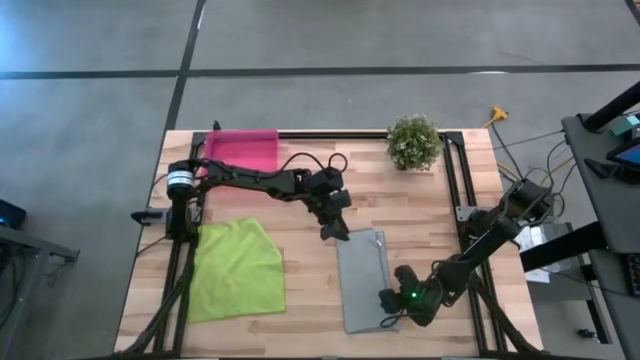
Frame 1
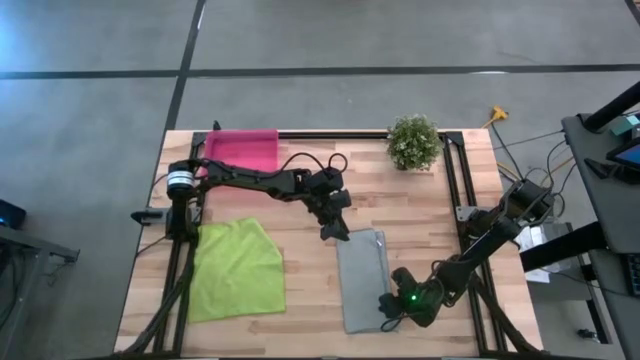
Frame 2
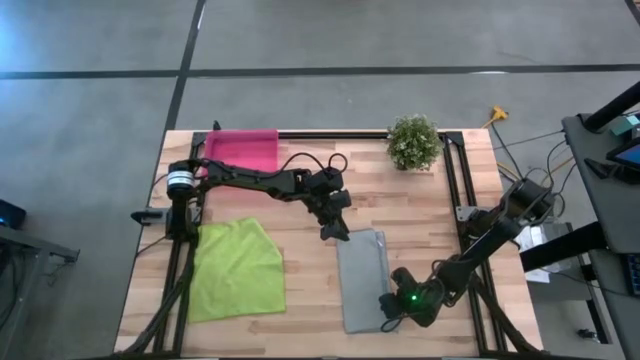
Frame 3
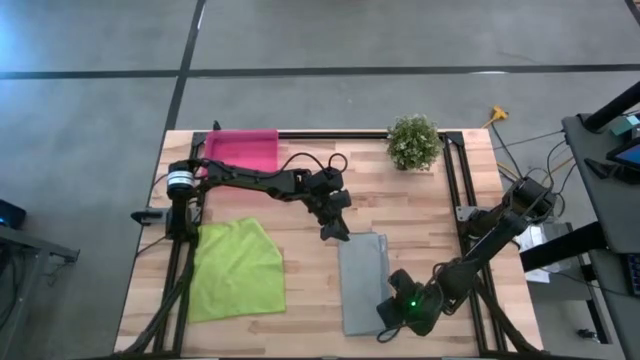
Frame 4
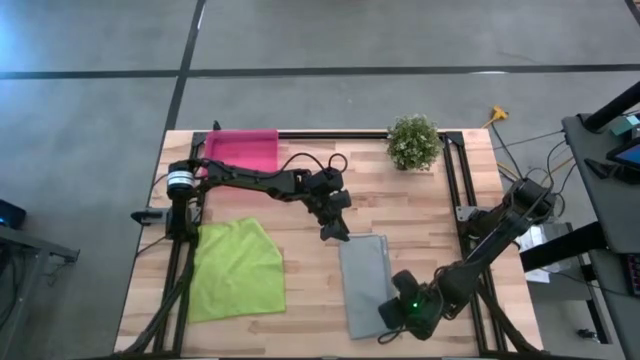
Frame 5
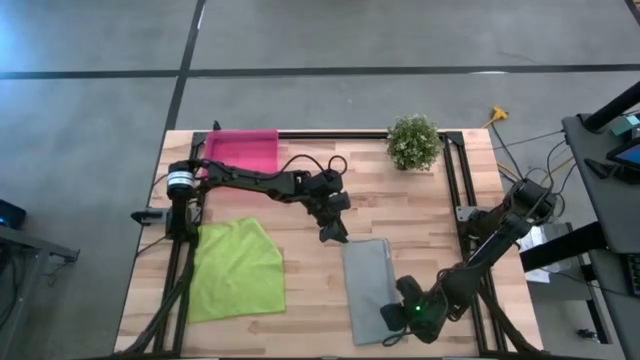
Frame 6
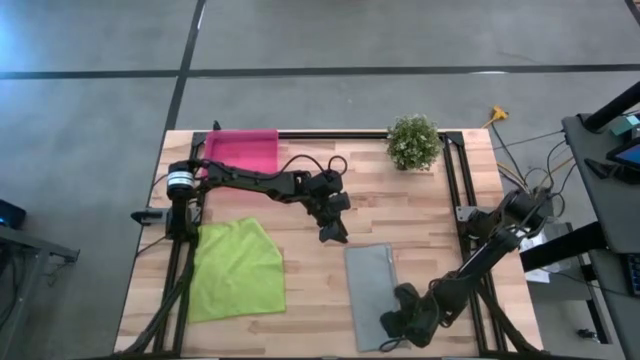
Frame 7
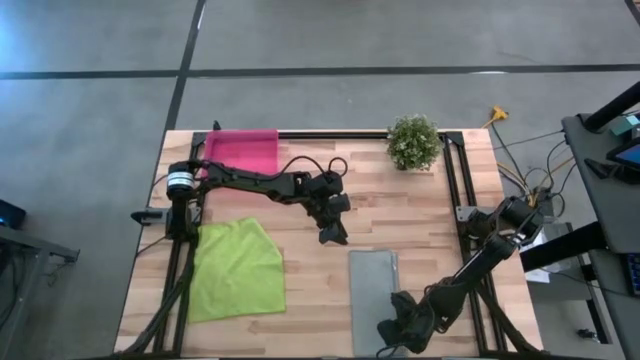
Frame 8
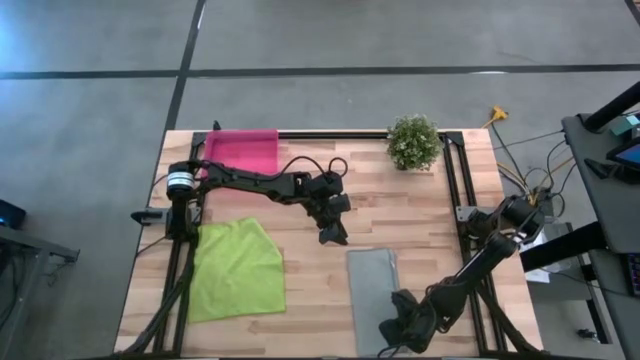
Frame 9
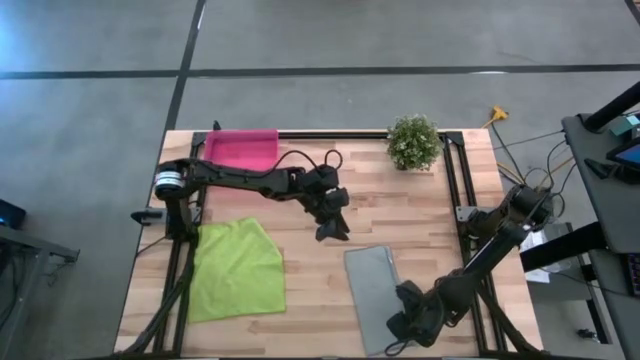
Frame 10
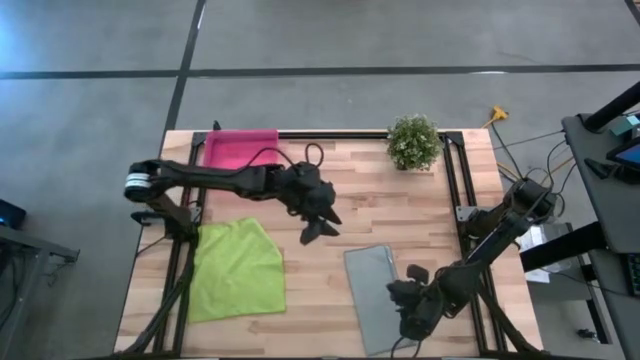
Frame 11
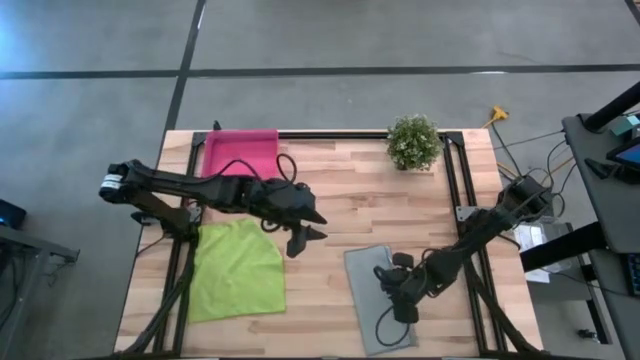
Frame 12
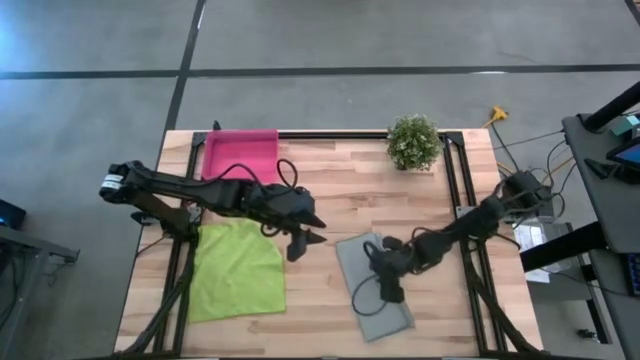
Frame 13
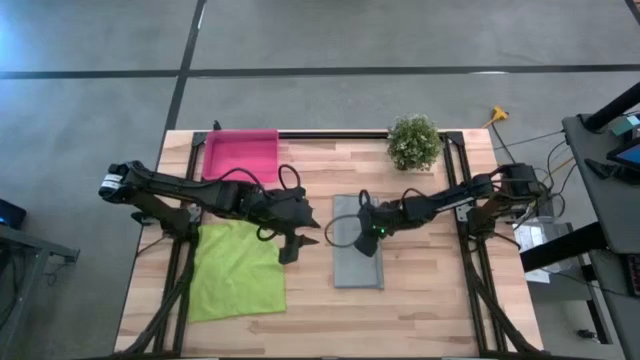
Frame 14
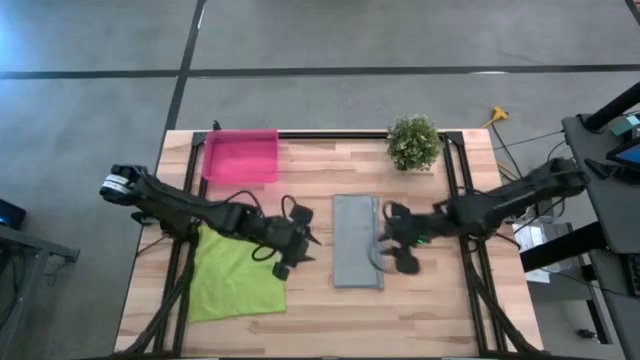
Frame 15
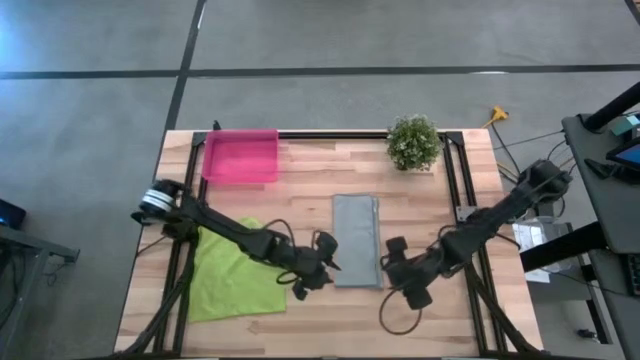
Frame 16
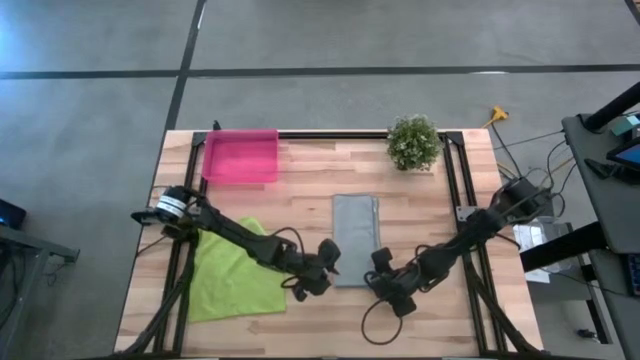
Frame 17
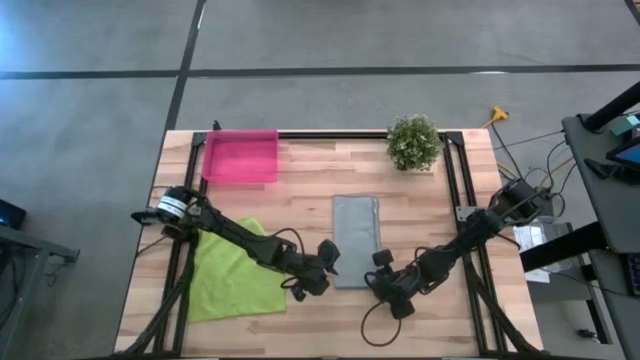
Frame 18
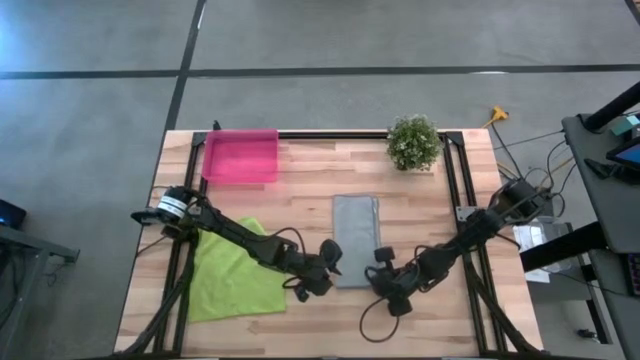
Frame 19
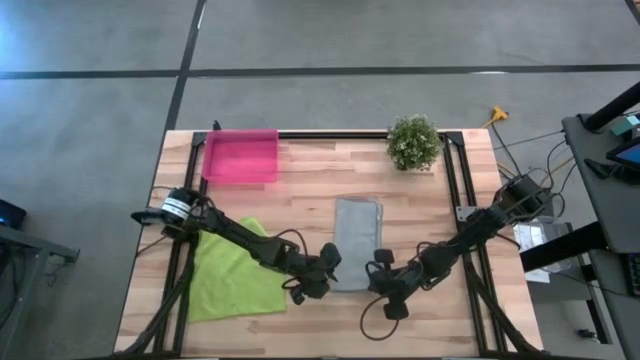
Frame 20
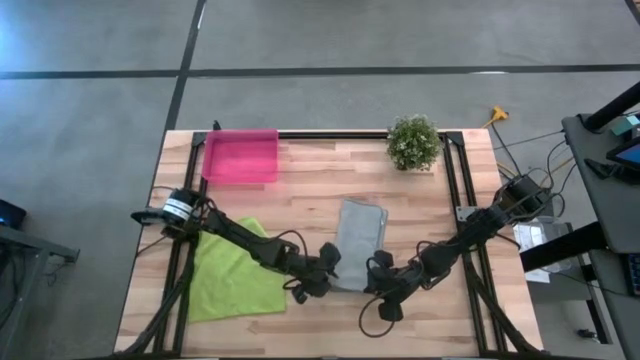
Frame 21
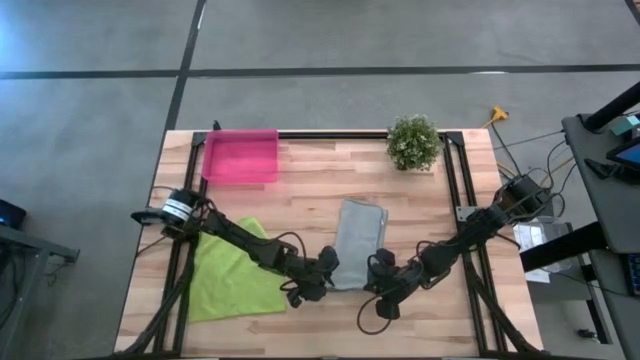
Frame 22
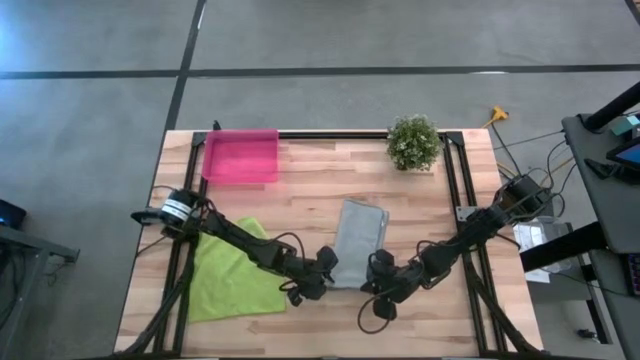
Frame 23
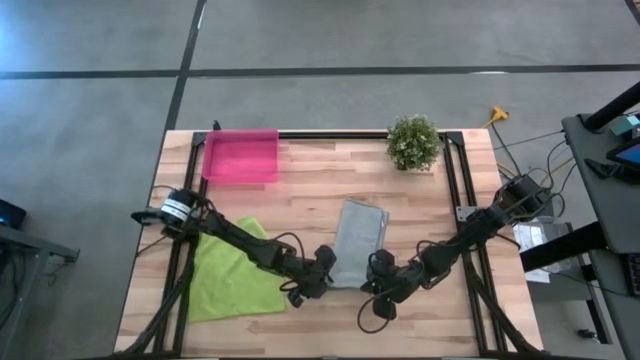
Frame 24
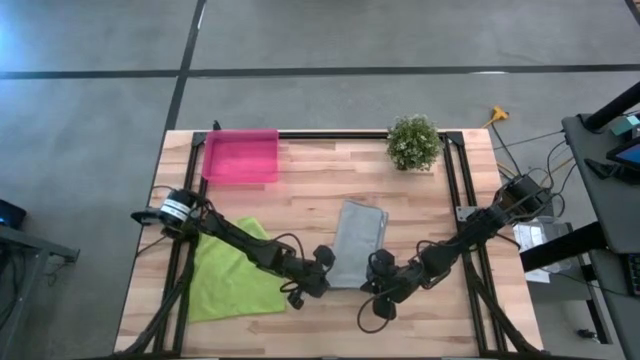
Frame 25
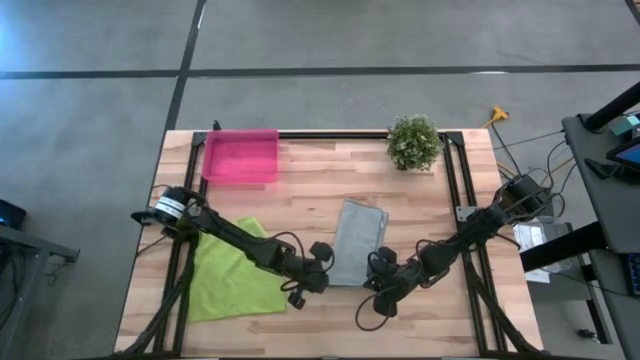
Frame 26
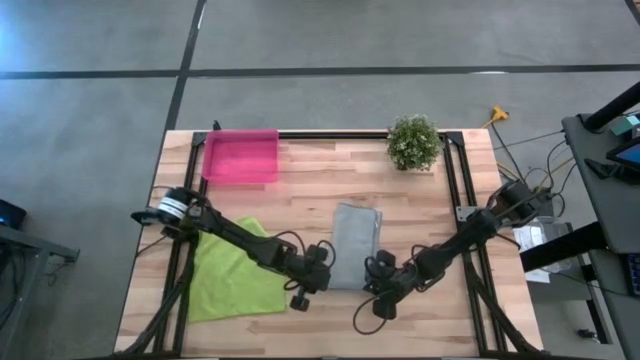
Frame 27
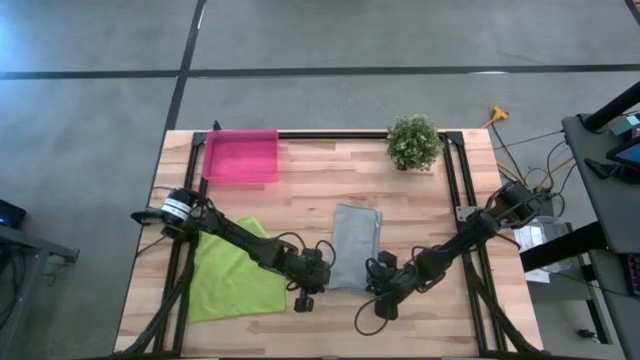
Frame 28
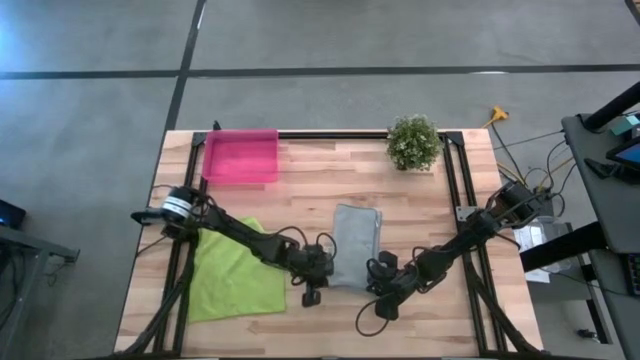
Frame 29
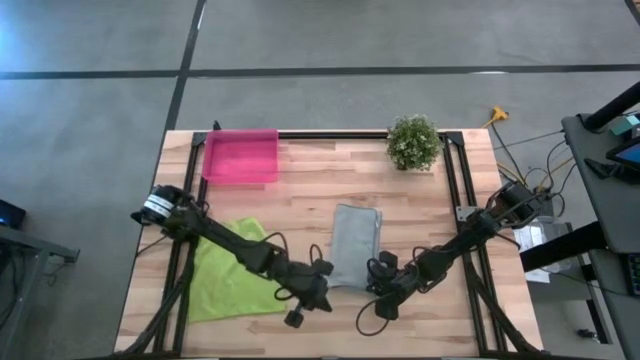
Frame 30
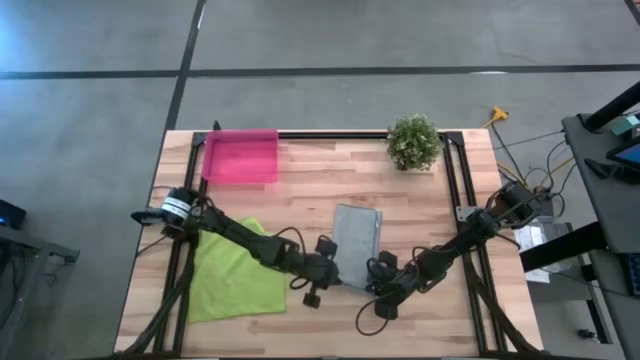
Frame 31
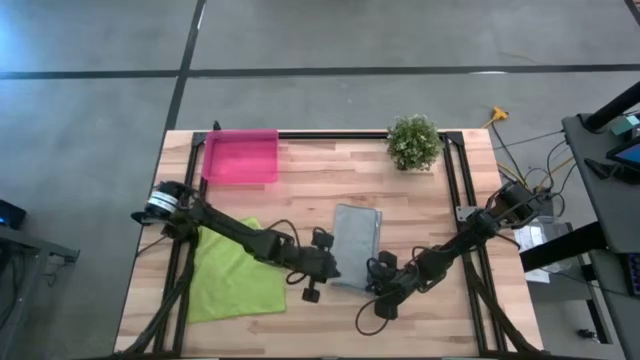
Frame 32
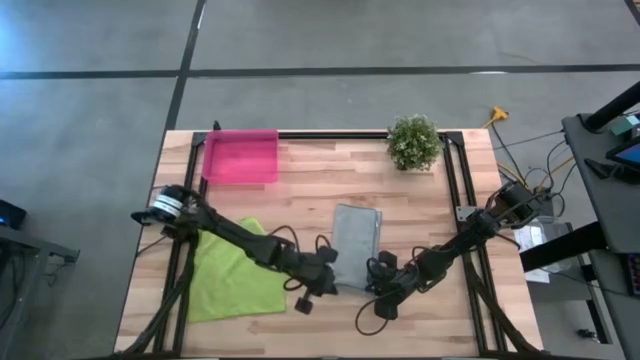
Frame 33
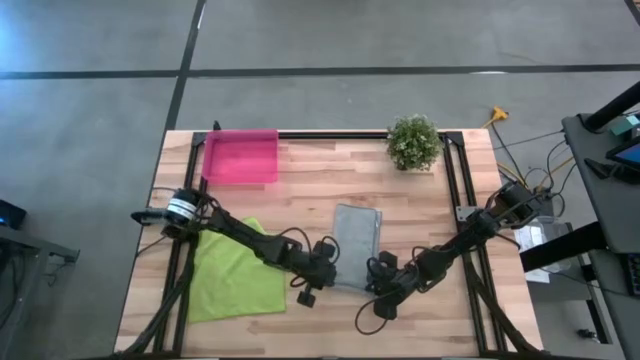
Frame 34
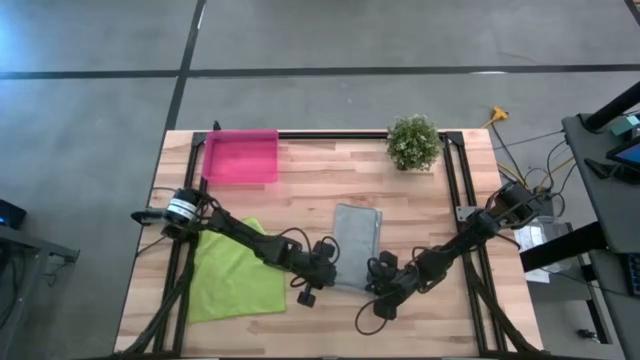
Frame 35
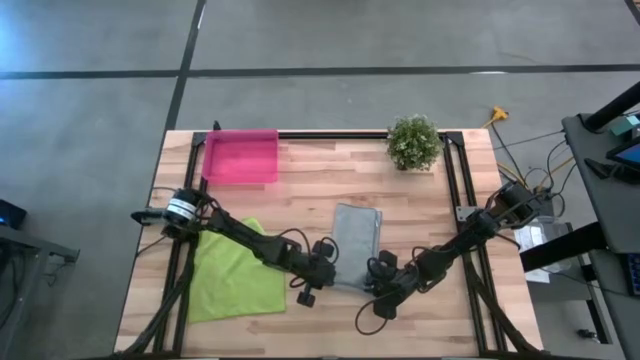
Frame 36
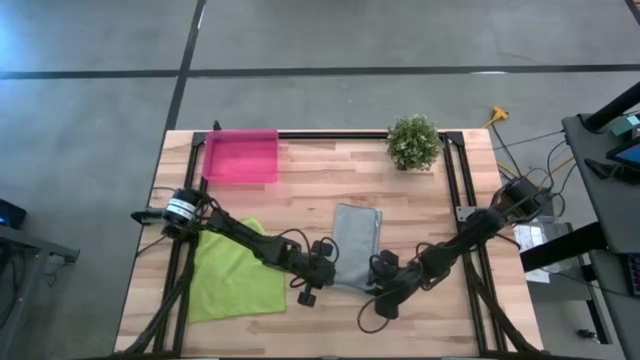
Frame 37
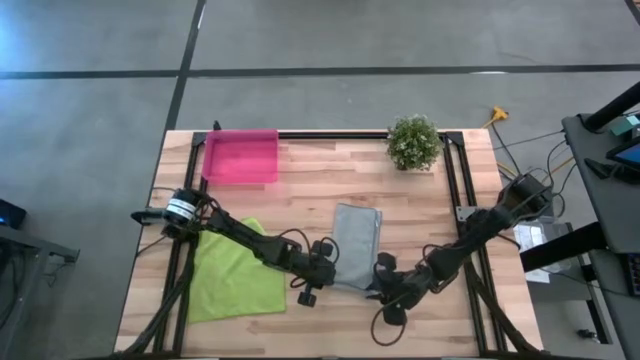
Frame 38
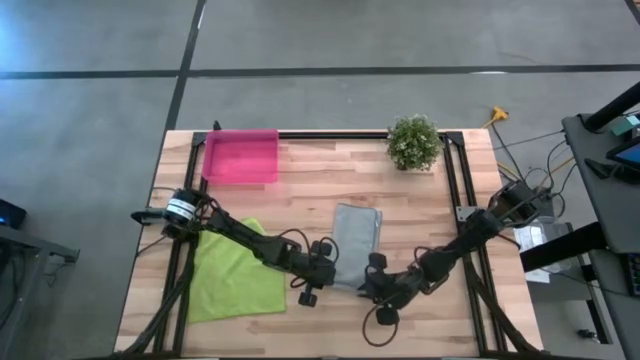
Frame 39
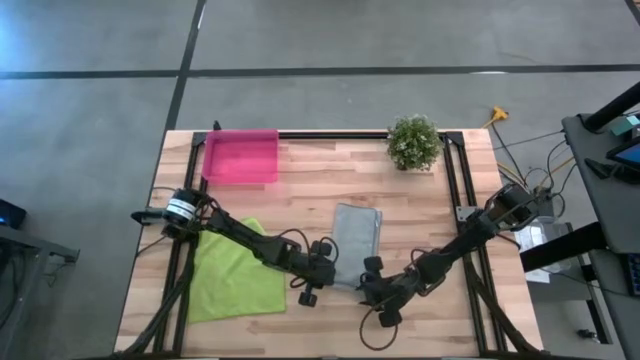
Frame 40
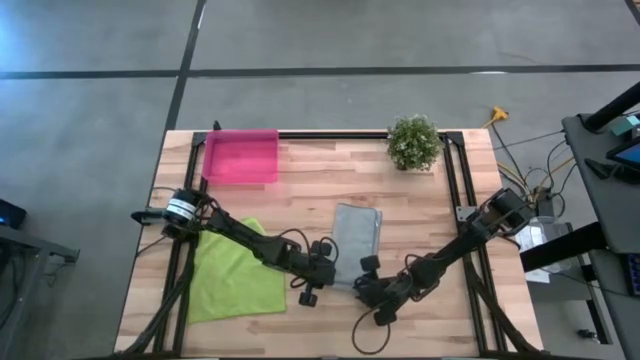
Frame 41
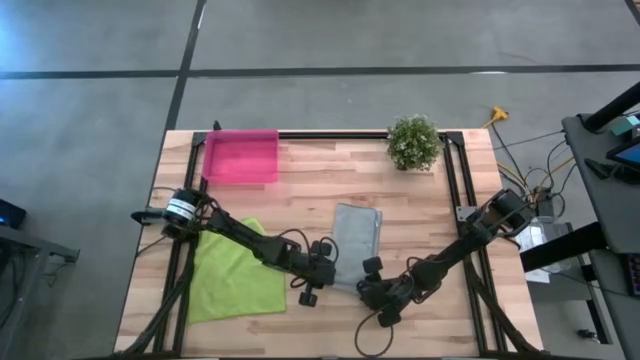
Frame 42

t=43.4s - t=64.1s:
Task: Roll microfiber towels into tight, uniform cylinder then place into a basket
Roll the blue microfiber cloth
